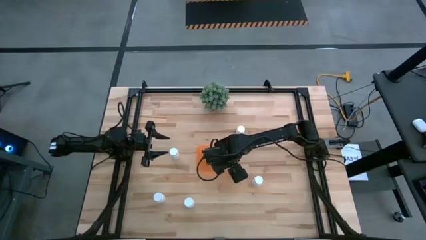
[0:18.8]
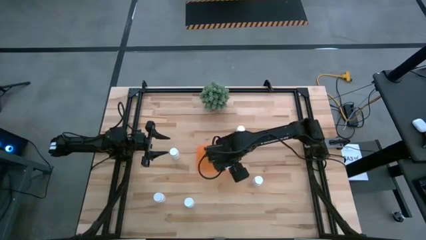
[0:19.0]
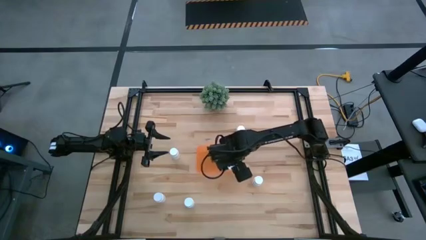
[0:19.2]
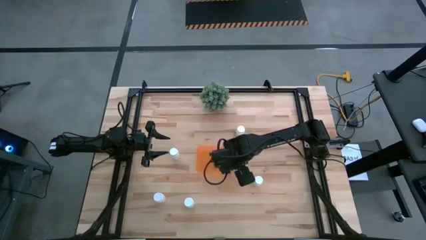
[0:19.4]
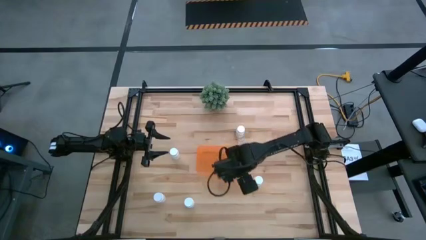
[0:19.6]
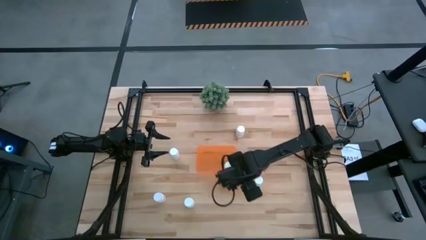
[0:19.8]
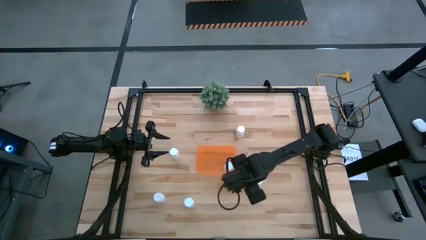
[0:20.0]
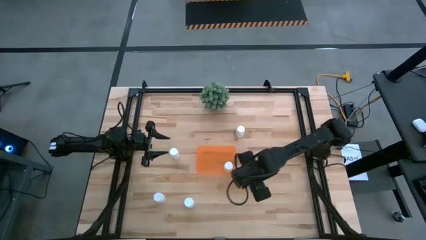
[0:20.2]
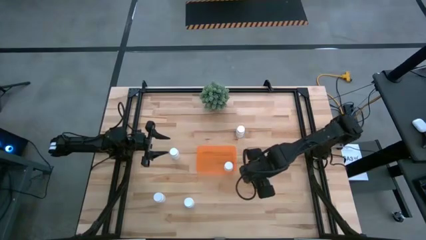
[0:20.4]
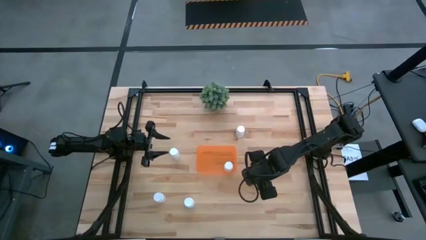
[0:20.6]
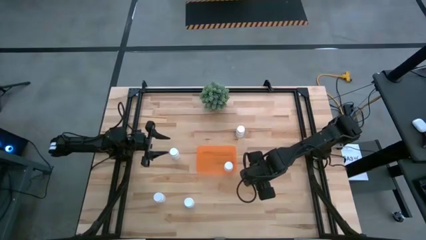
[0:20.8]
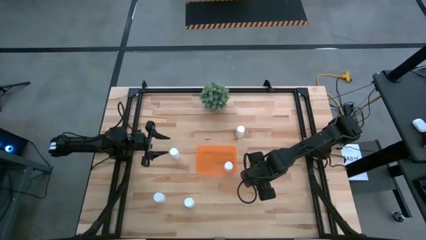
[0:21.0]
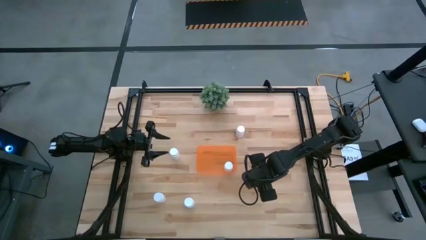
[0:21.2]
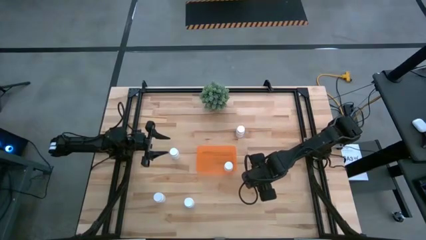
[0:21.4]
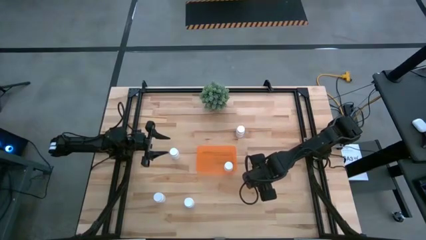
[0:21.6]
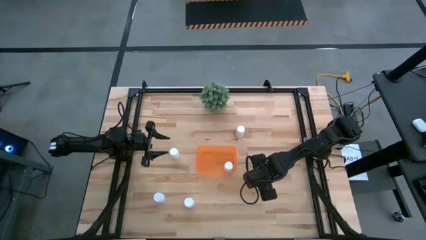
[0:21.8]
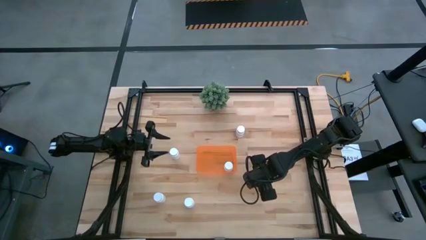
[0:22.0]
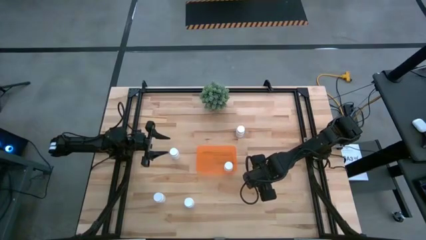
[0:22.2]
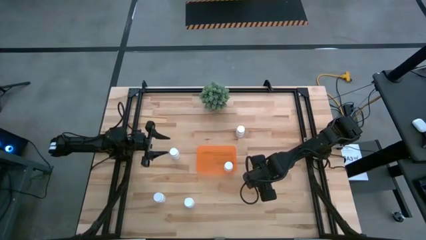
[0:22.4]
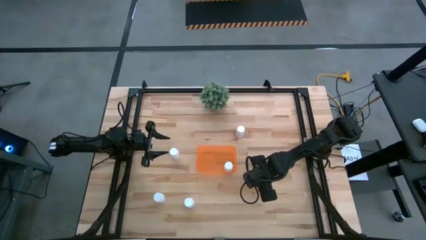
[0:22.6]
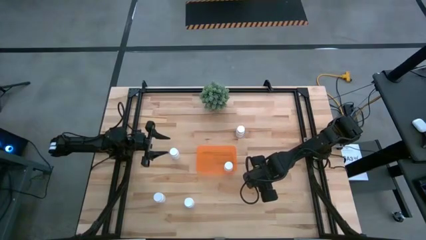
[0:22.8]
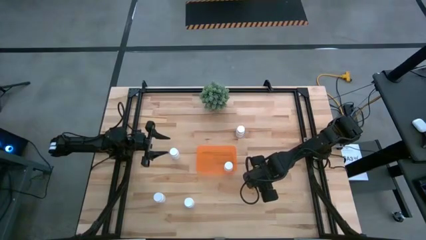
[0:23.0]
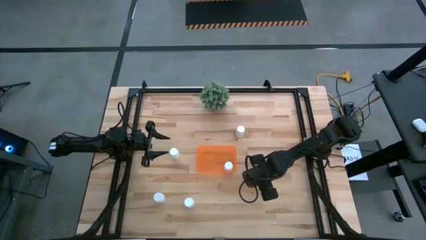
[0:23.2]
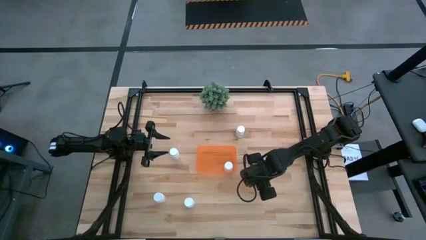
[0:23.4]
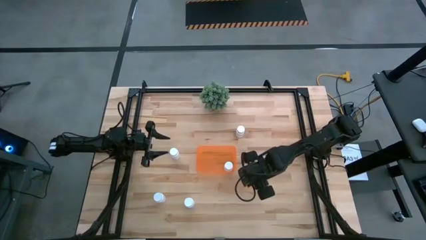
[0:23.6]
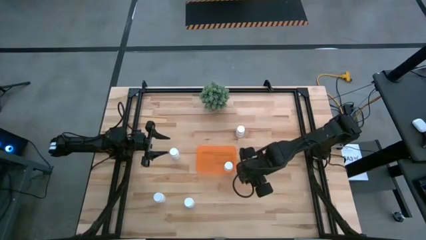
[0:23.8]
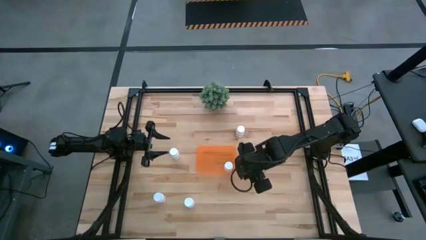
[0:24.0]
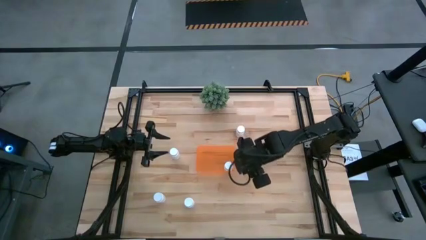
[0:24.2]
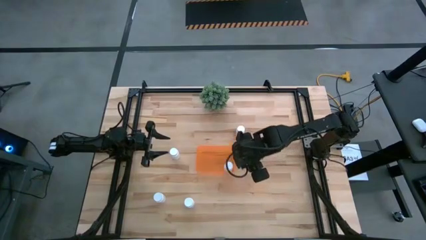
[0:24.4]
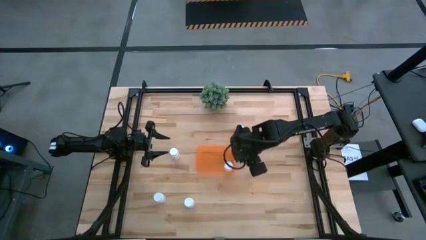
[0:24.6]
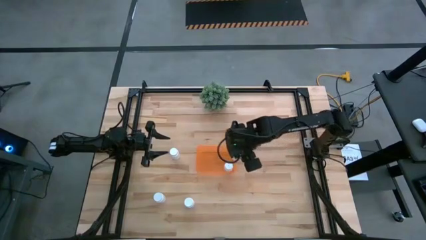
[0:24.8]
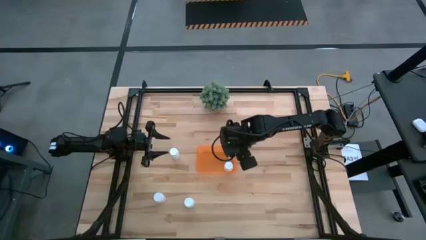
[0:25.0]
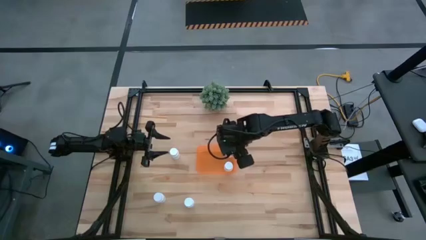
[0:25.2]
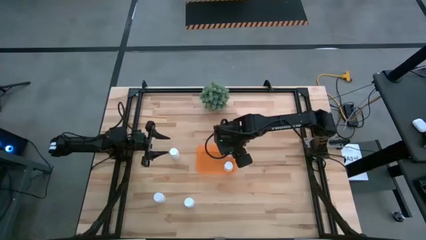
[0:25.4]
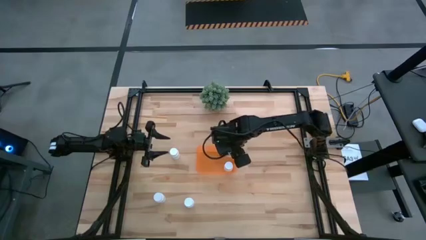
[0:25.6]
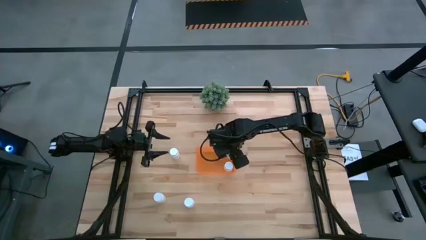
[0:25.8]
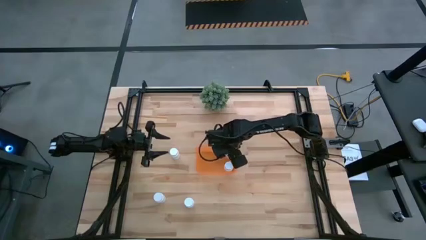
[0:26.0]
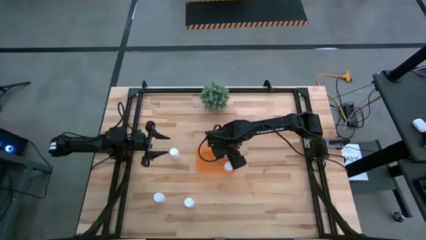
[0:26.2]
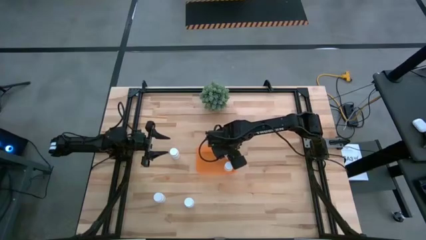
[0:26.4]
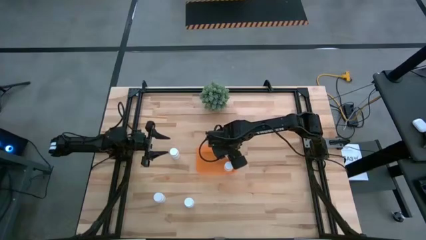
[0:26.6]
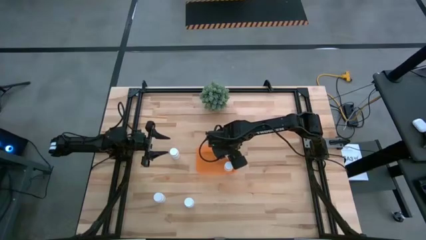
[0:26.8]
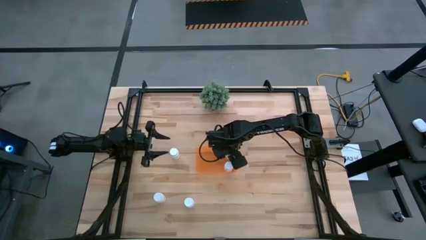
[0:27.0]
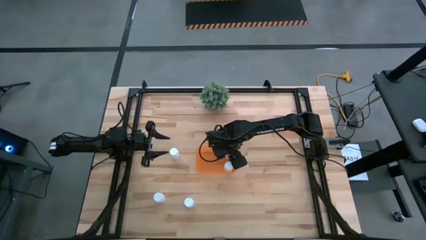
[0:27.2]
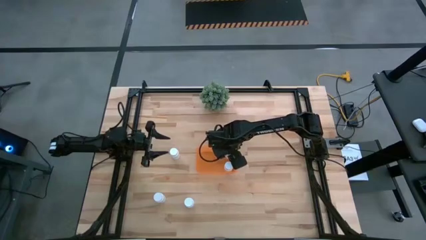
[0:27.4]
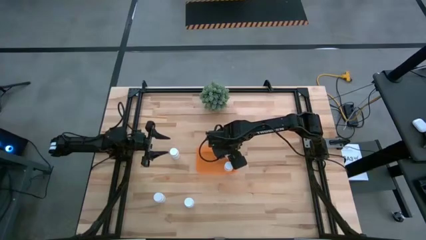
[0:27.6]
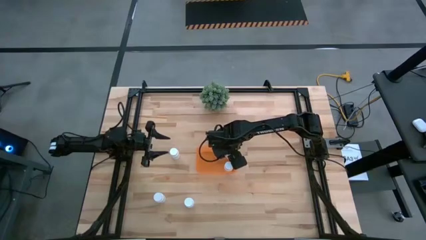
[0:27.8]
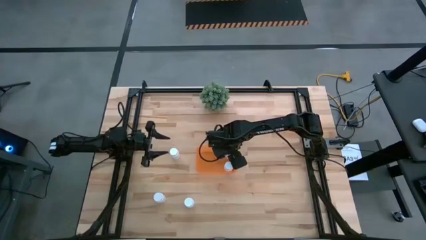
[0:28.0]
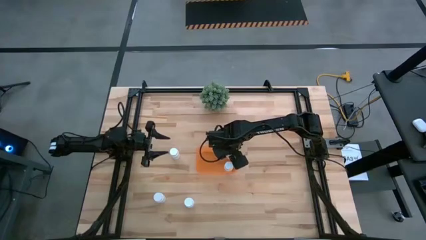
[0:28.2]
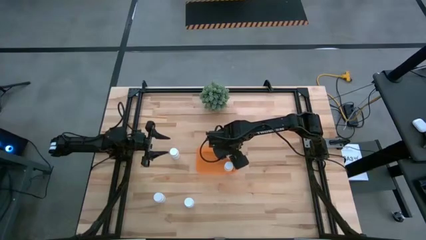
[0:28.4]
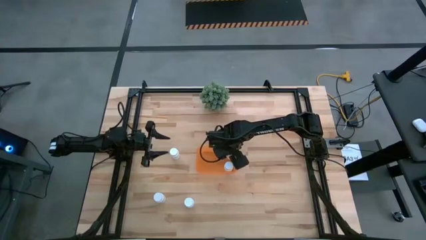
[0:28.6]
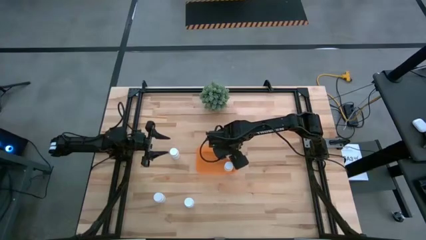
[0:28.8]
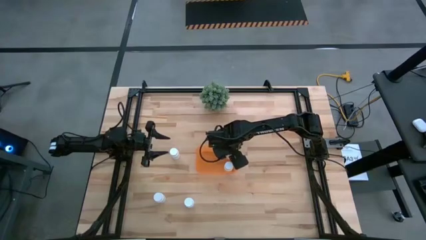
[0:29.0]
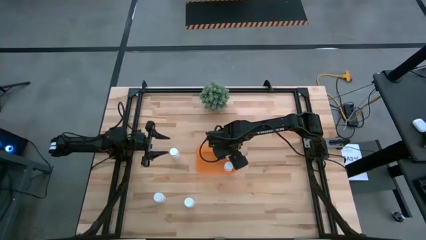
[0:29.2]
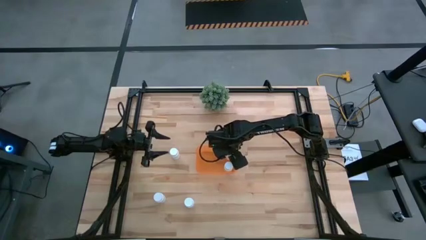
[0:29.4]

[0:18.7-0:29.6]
Task: Pick and place pill bottles into a basket
Put the white medicine bottle into the orange bin

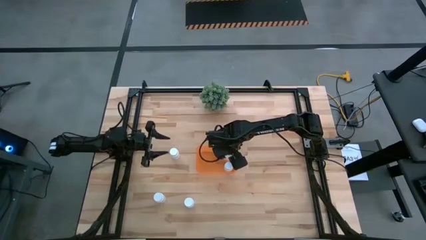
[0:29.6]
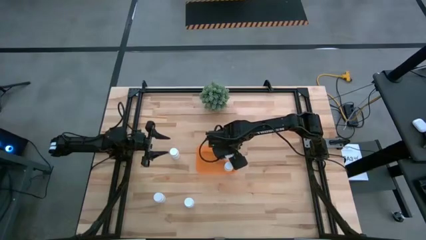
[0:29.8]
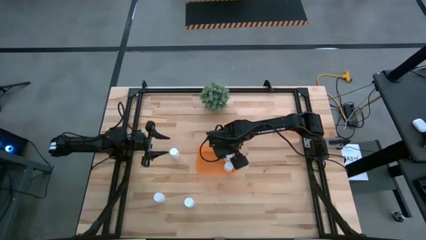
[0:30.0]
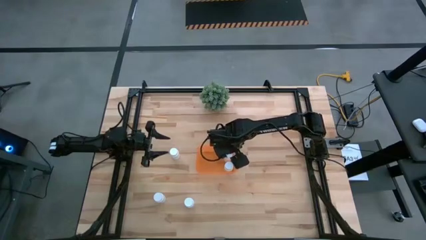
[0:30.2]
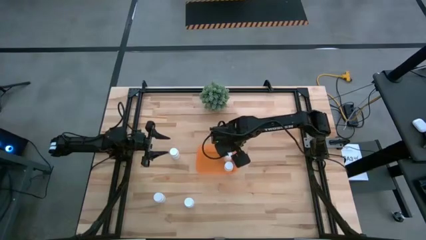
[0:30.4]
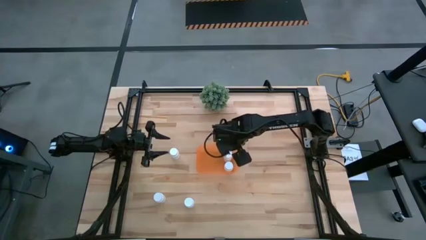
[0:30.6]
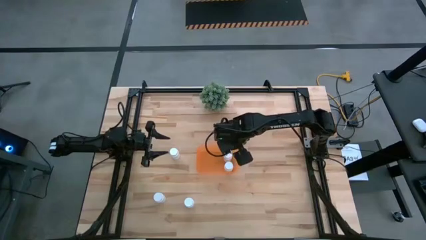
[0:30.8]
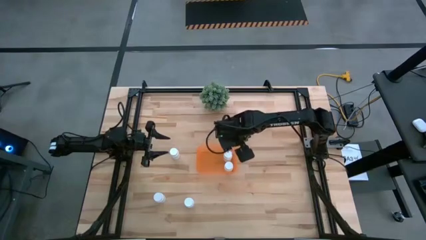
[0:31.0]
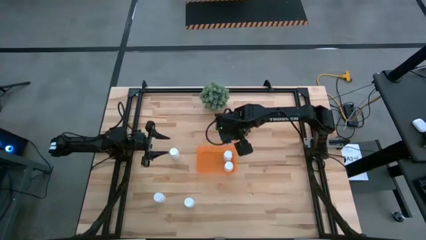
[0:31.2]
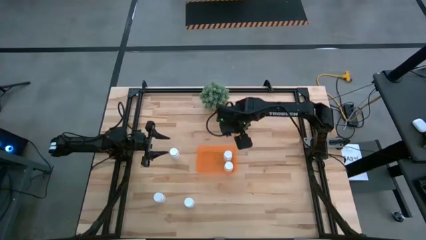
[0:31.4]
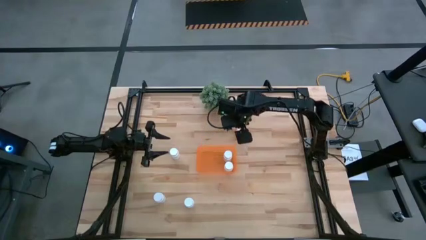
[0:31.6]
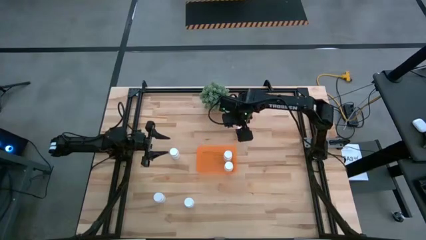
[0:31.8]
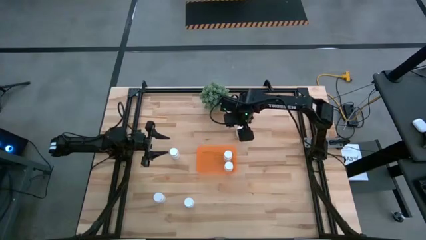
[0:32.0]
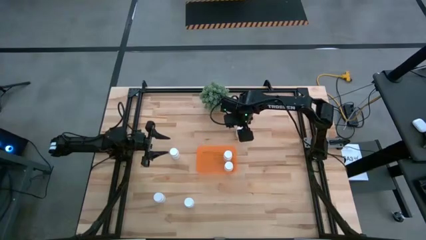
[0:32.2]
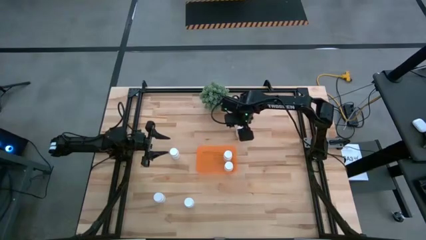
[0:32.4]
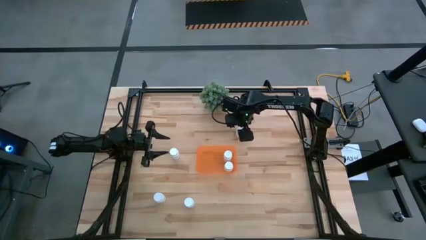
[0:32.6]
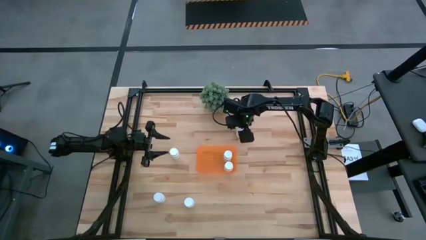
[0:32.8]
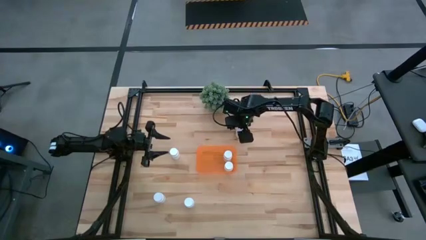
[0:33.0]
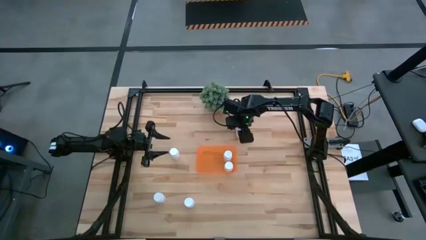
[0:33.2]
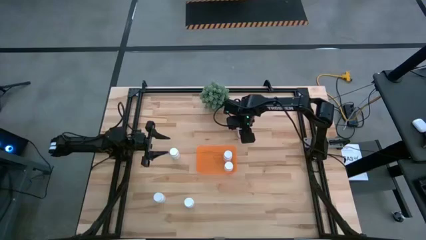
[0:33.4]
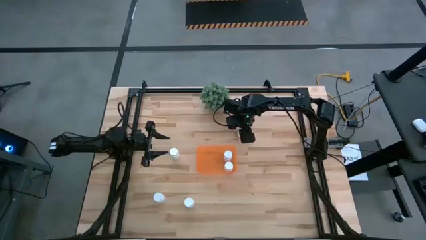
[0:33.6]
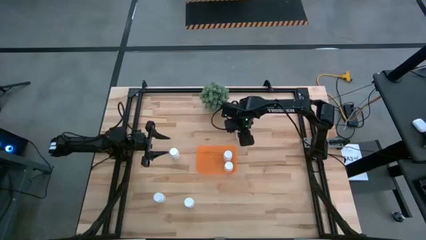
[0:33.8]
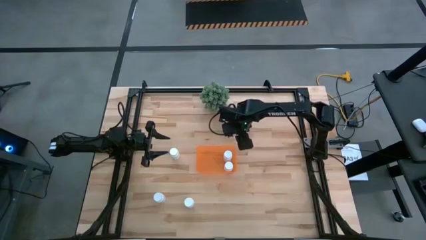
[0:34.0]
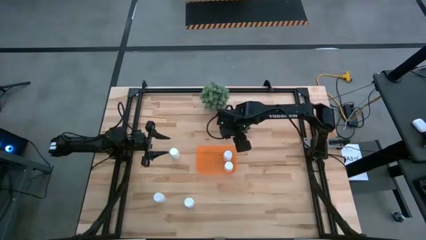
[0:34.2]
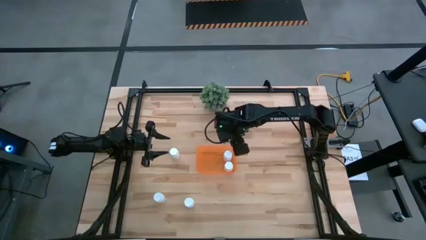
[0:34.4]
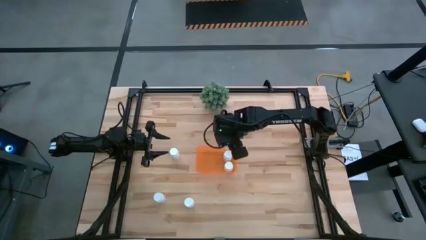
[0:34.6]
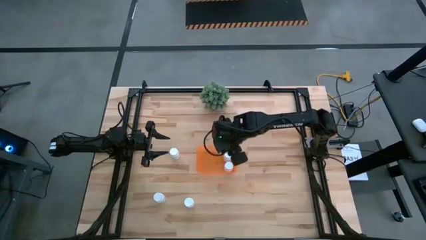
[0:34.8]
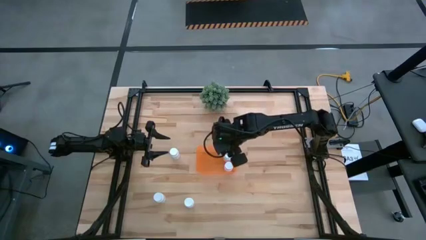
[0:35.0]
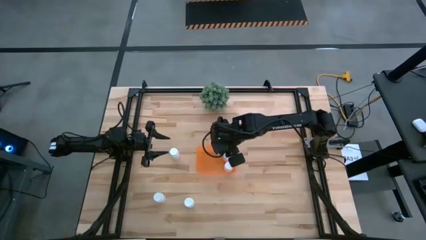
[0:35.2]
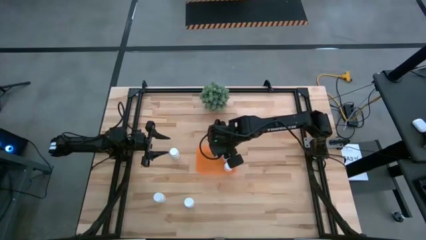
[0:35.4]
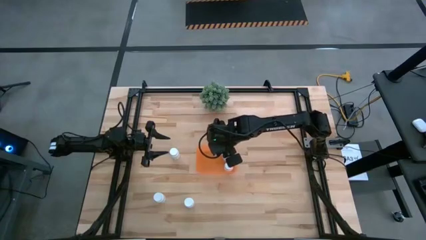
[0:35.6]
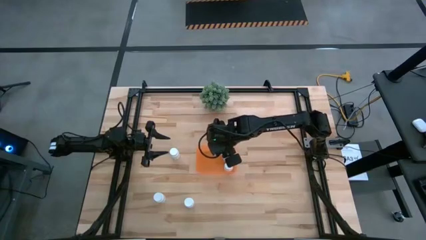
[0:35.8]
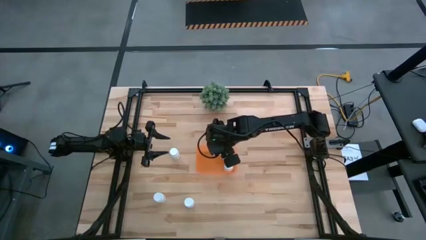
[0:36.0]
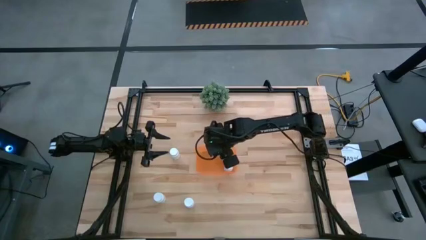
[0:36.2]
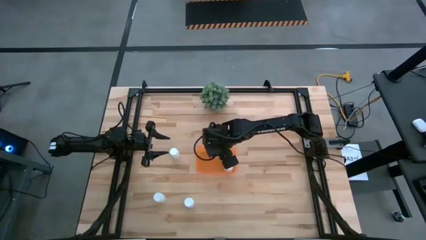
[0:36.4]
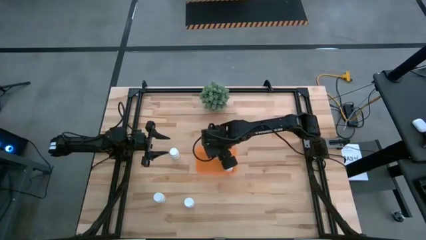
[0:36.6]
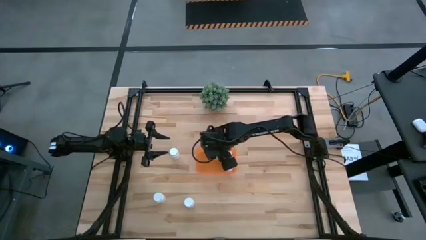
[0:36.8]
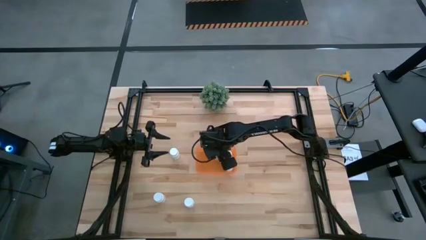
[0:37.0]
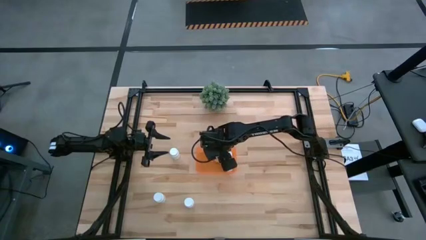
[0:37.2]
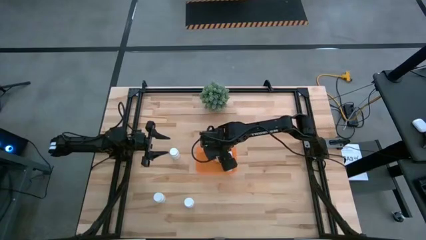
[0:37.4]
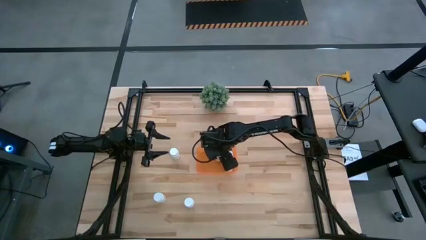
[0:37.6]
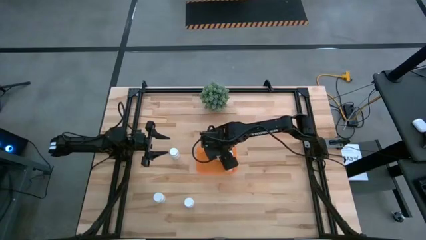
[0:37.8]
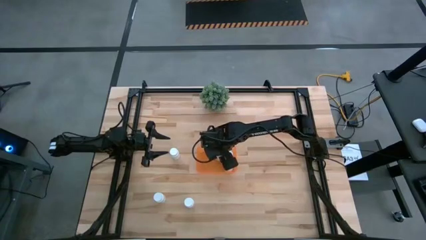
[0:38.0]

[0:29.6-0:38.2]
Put the white medicine bottle into the orange bin
